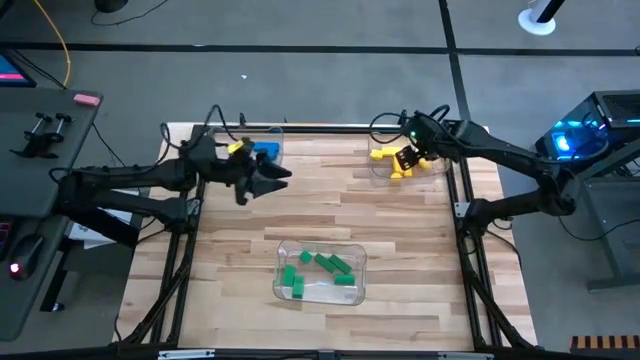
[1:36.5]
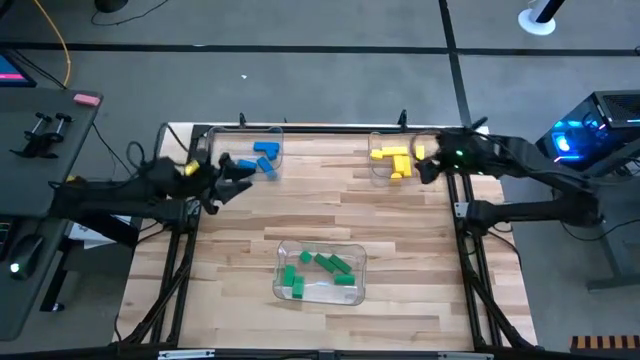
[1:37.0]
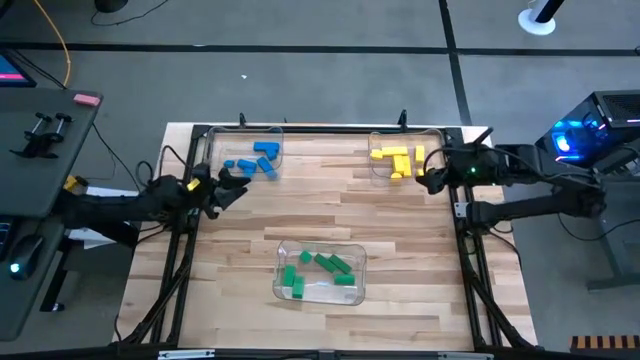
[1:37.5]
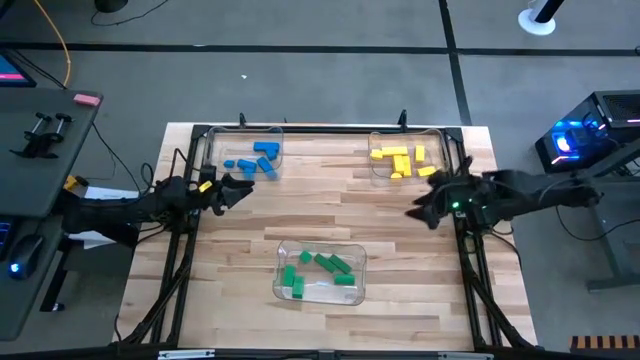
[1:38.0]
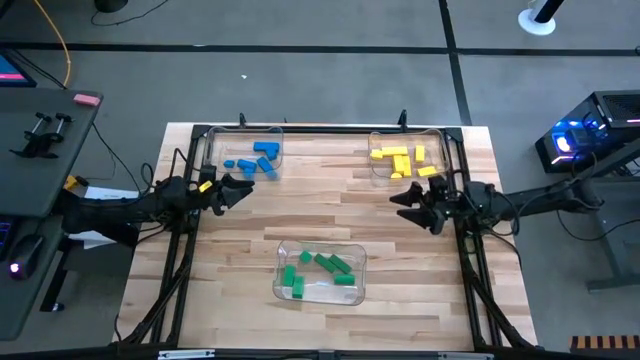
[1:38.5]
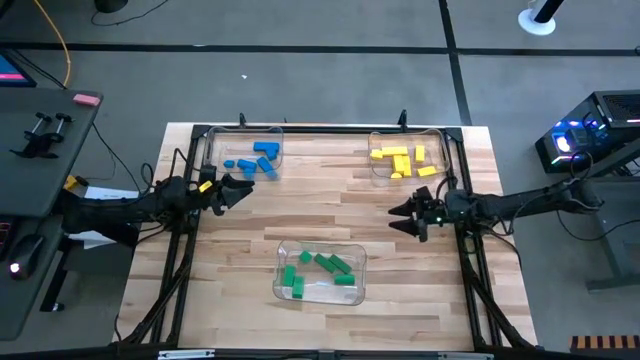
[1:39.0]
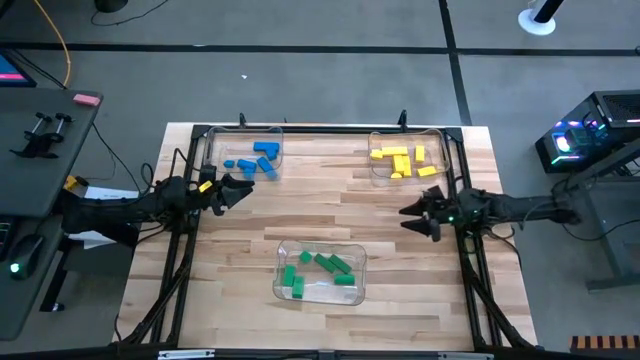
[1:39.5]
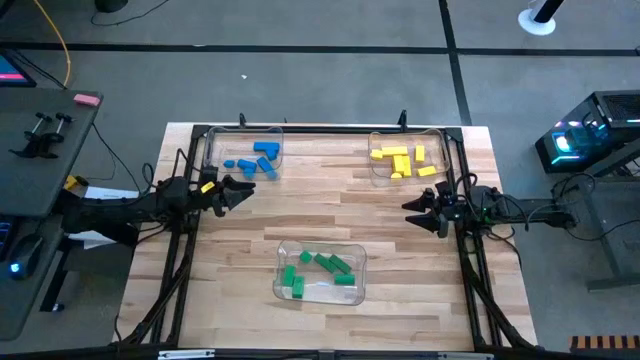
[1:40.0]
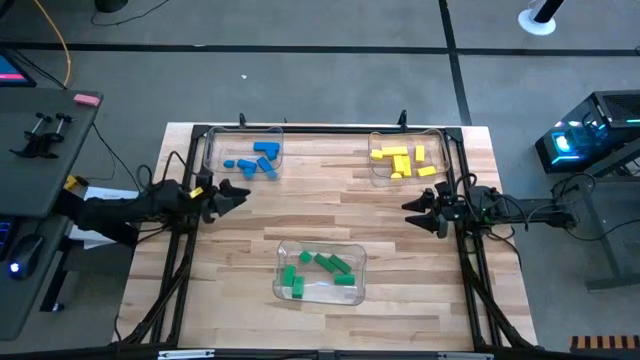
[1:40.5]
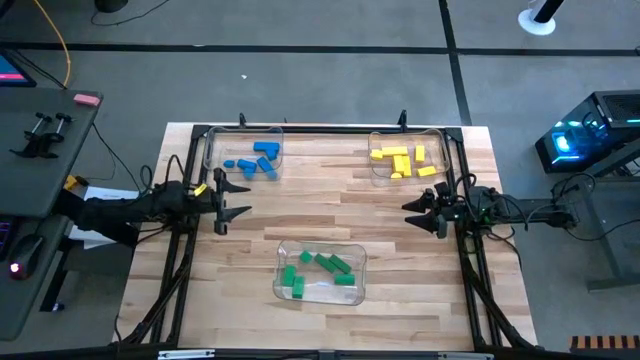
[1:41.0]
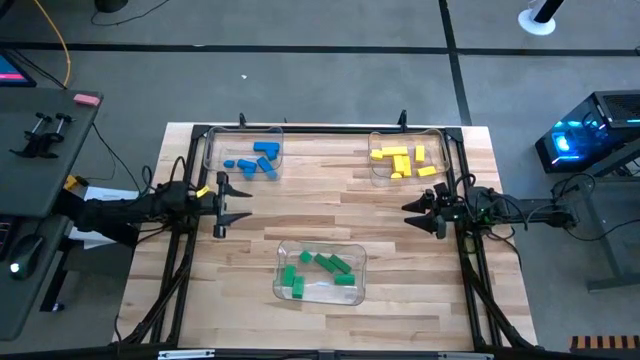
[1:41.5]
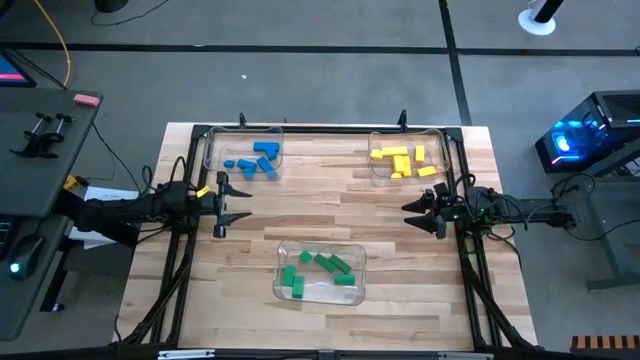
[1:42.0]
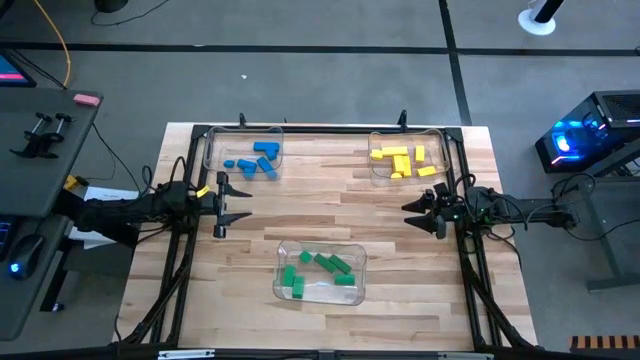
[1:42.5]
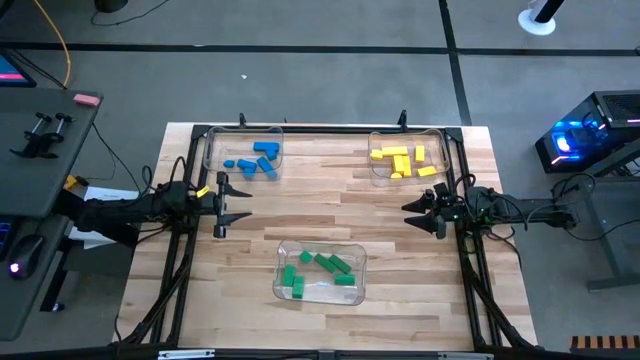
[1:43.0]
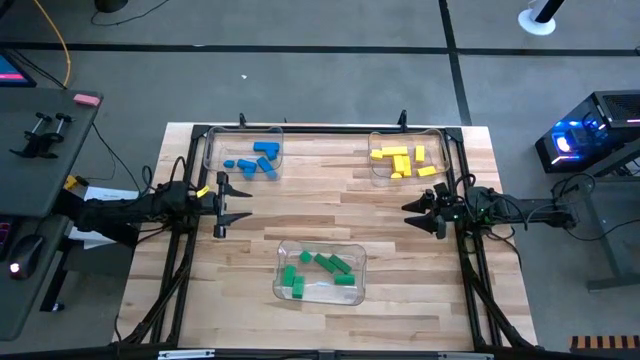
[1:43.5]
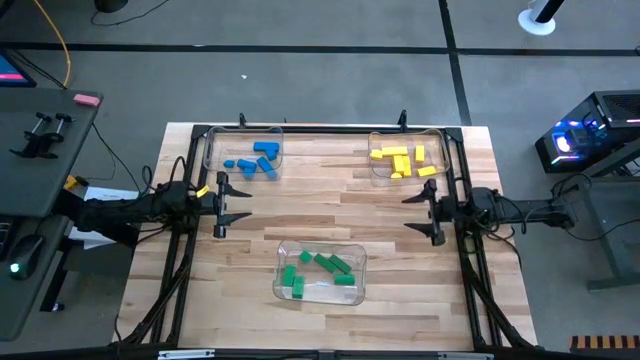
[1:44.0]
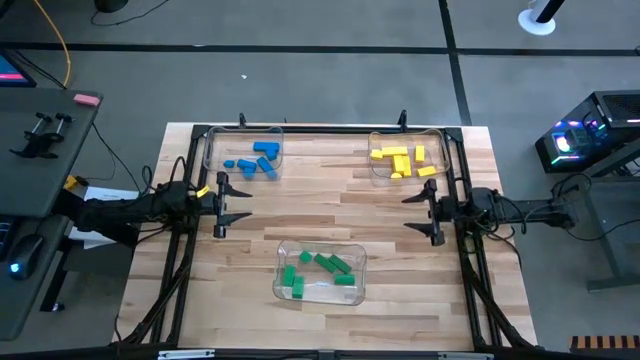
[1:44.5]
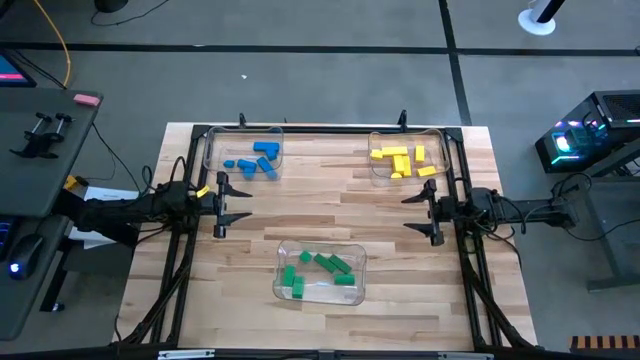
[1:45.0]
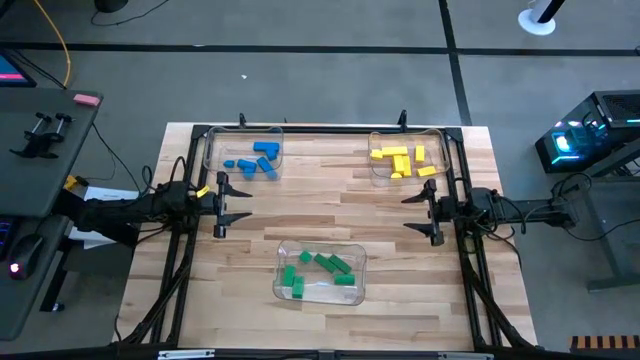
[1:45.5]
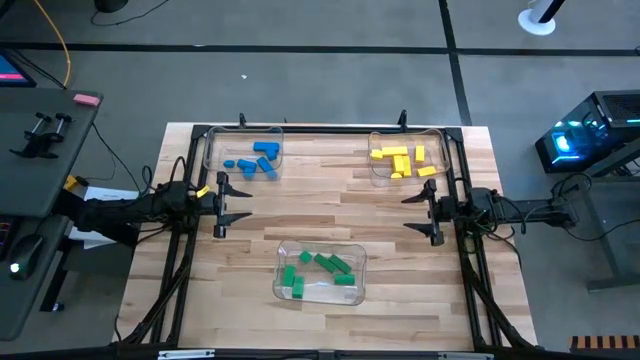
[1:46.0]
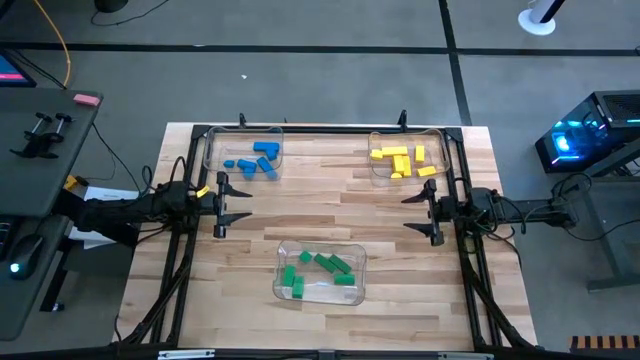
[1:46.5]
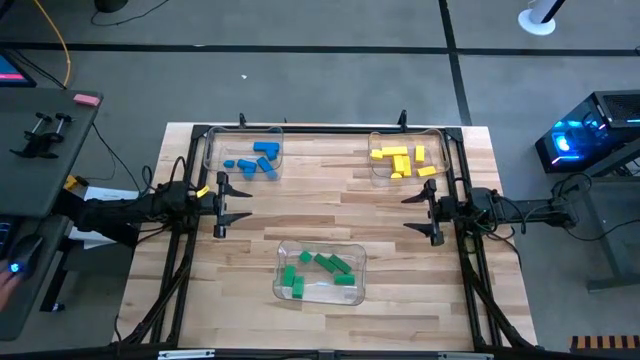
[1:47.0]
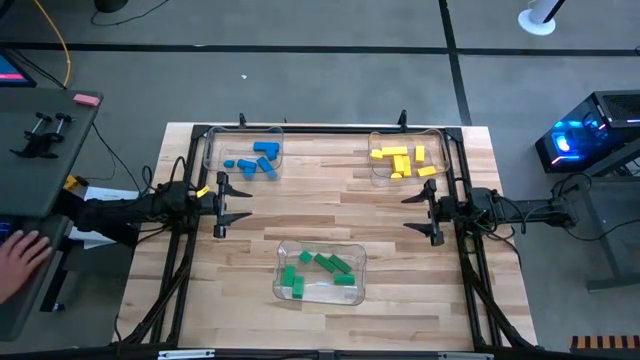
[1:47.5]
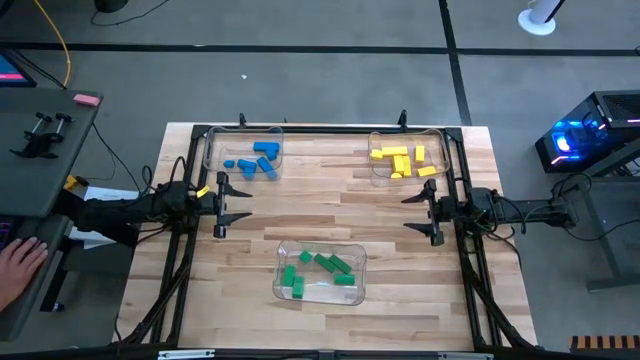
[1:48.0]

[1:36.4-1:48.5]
Task: Sort blocks
Return to Home Position

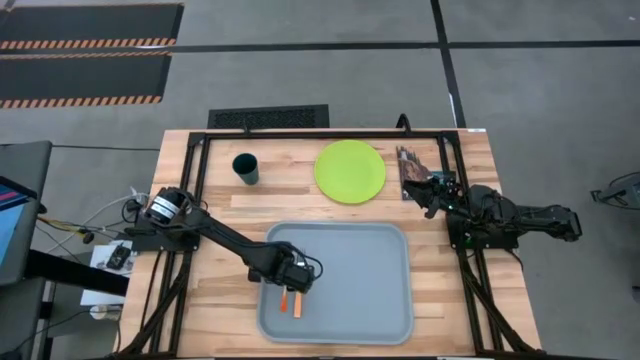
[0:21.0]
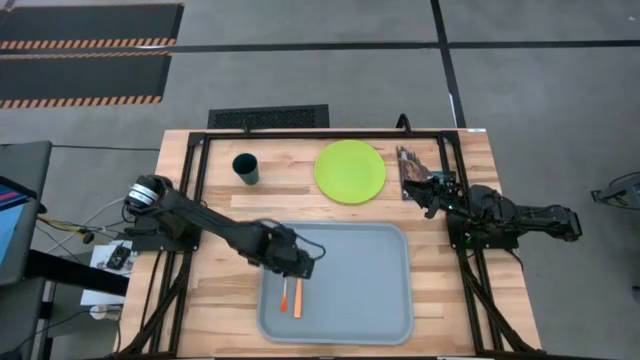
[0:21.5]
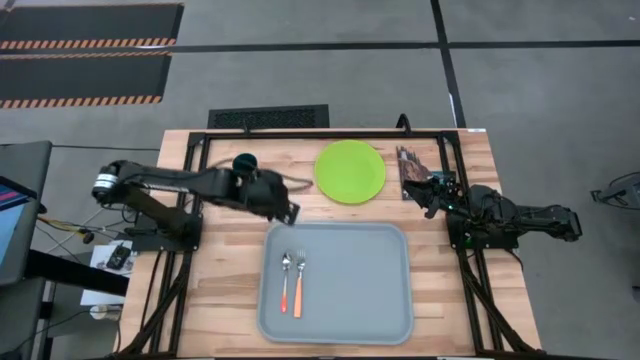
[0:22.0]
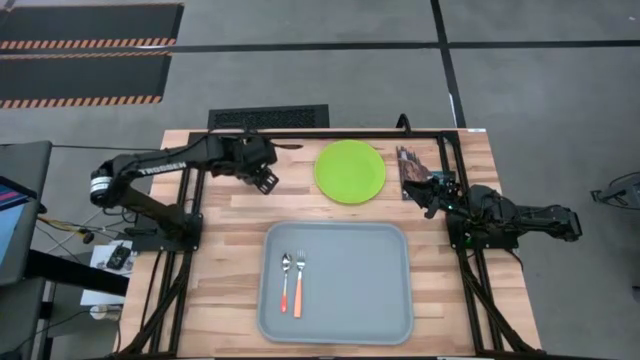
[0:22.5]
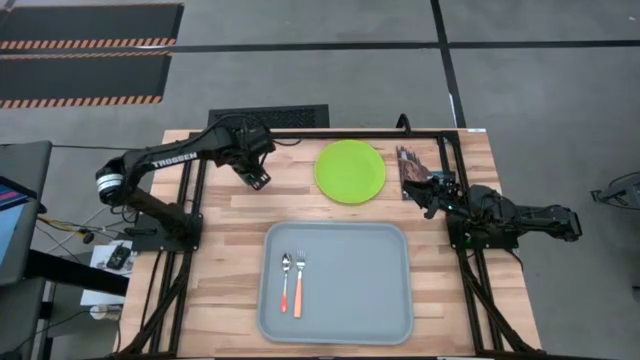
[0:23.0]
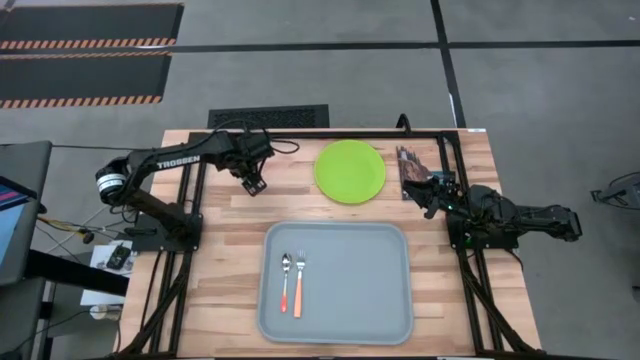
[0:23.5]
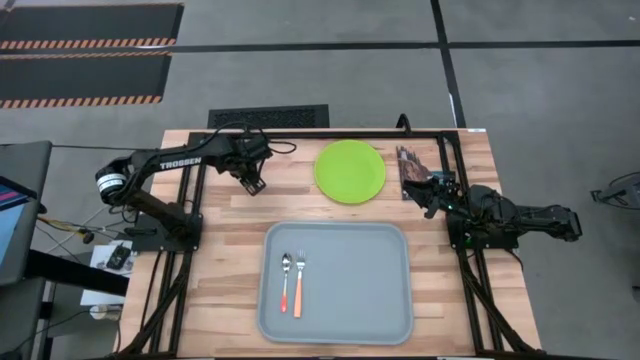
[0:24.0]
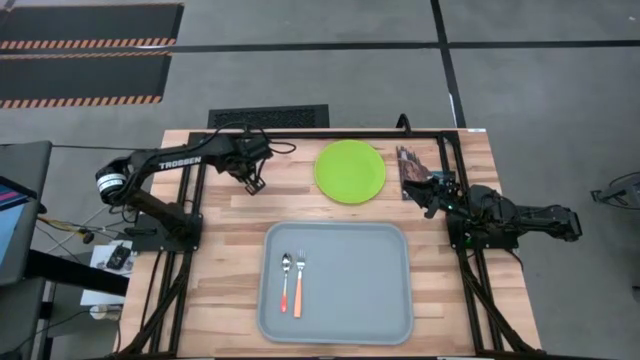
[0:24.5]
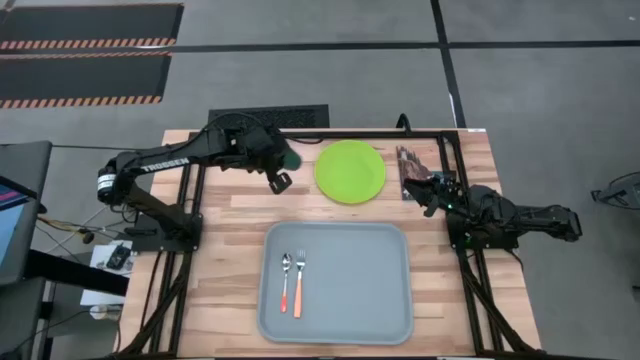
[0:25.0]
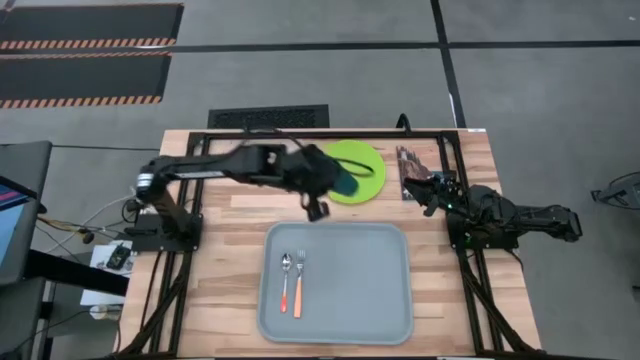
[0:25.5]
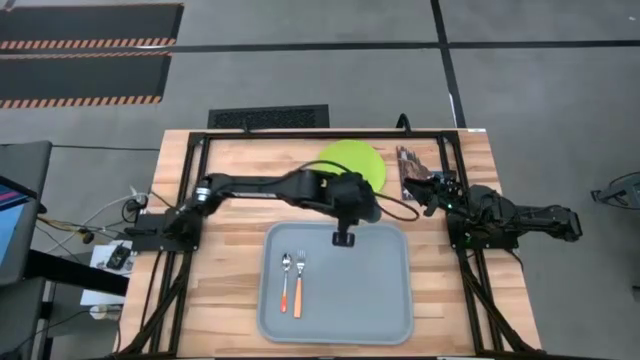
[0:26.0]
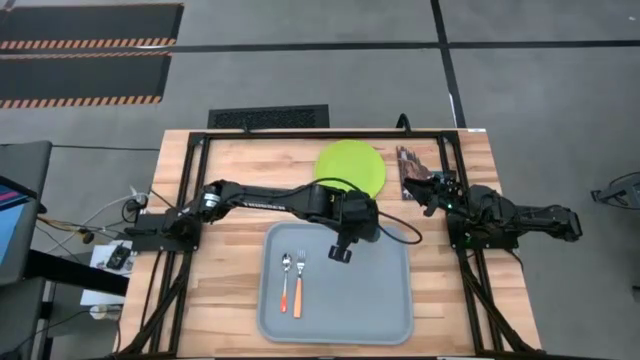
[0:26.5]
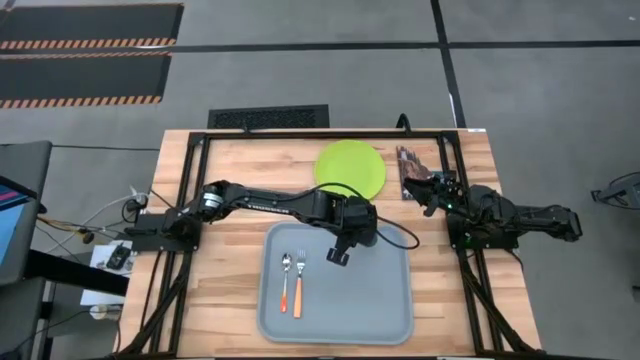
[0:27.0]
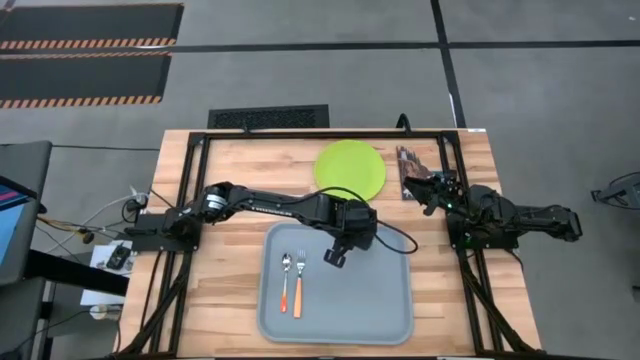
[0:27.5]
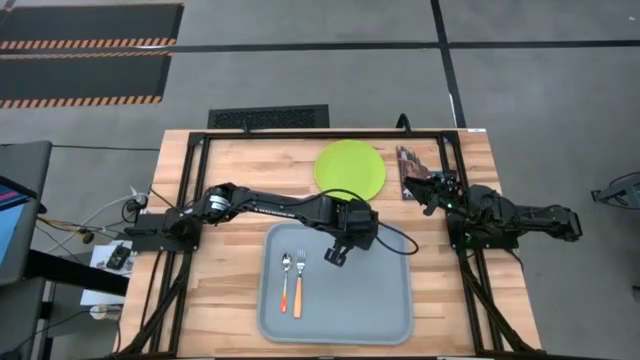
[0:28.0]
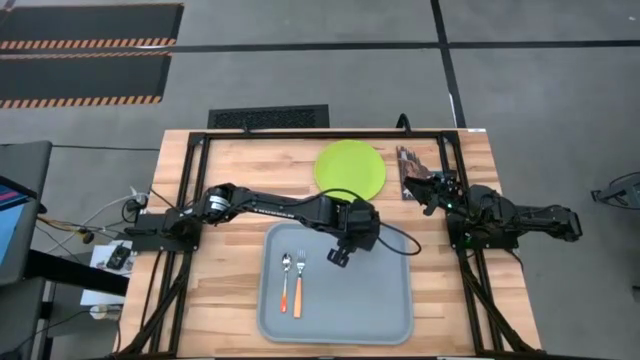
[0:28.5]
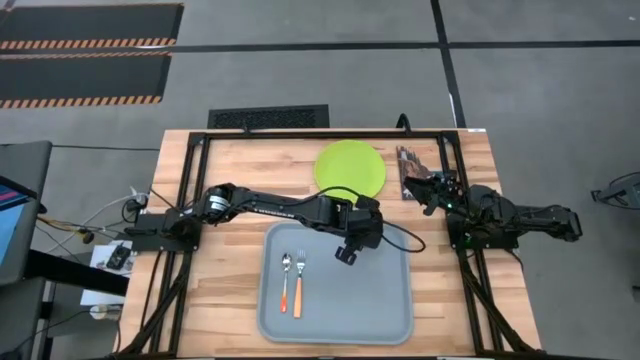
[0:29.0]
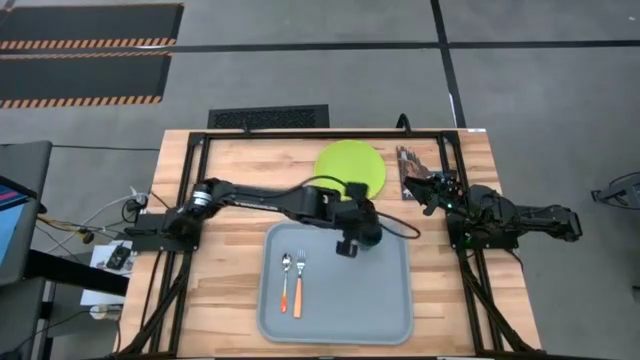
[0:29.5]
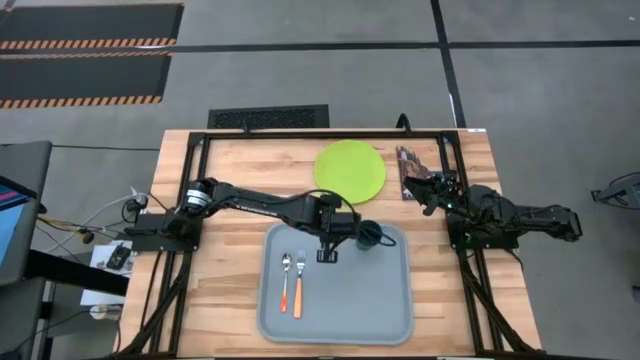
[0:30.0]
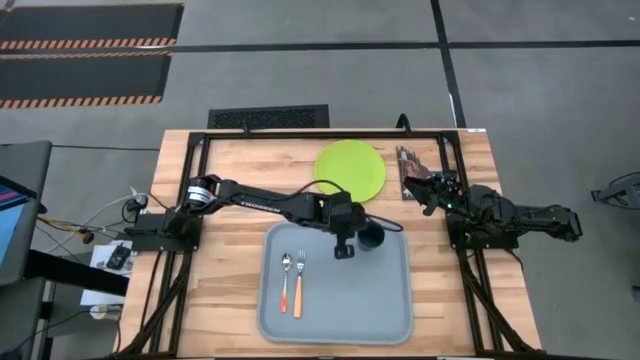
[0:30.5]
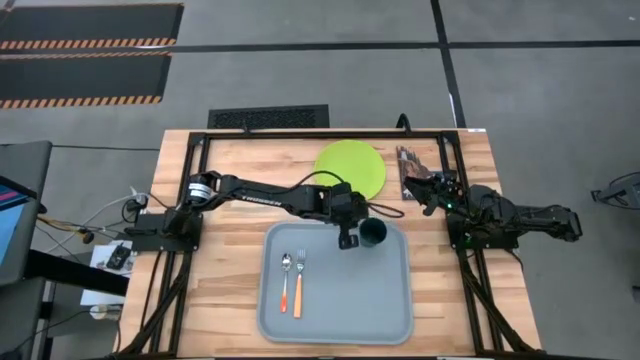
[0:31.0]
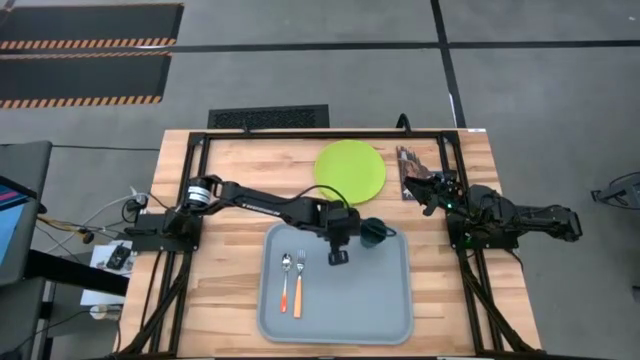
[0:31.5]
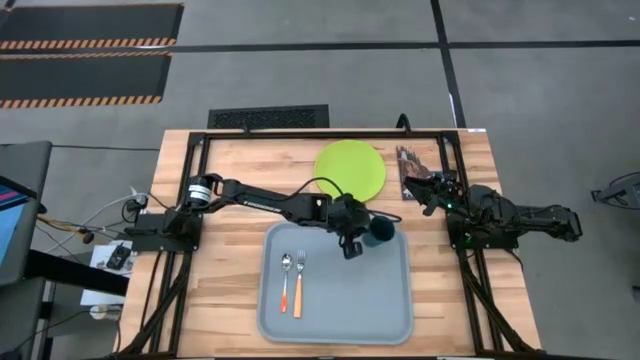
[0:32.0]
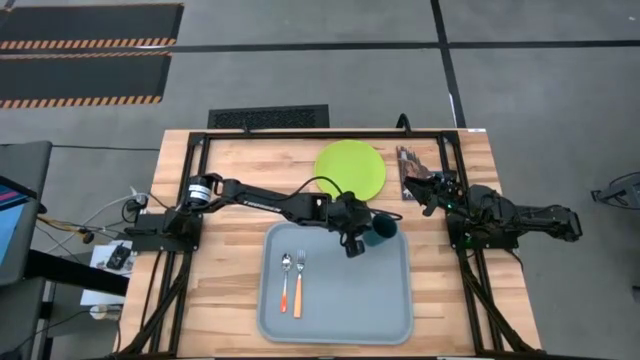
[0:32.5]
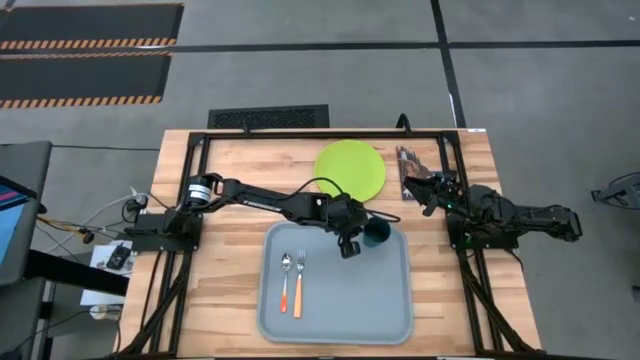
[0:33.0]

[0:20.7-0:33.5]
Task: Pick and place plate/cup/fork/spoon on tray
Put the green cup on the gray tray to the top right corner
